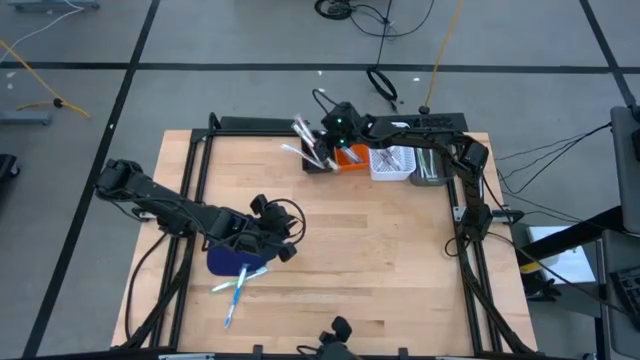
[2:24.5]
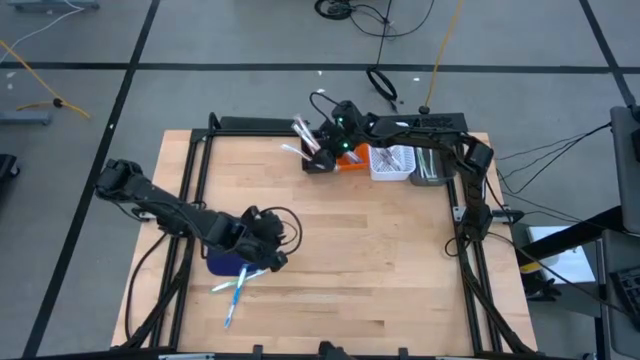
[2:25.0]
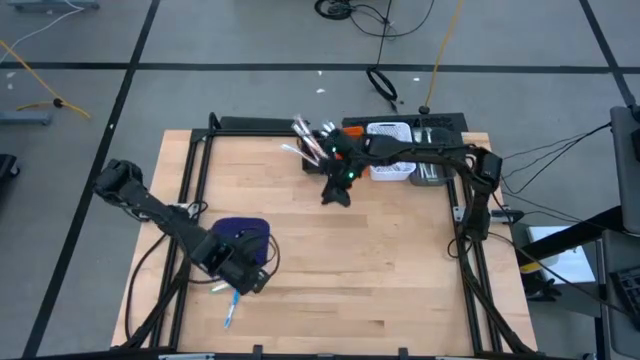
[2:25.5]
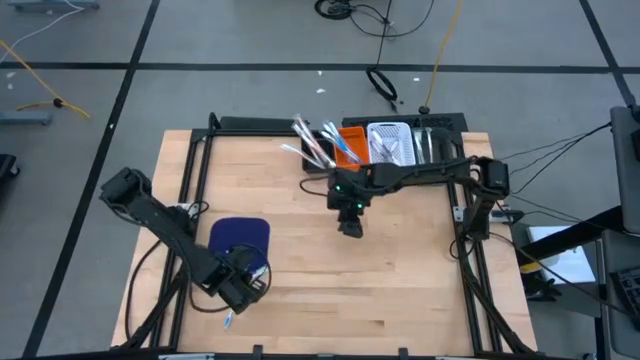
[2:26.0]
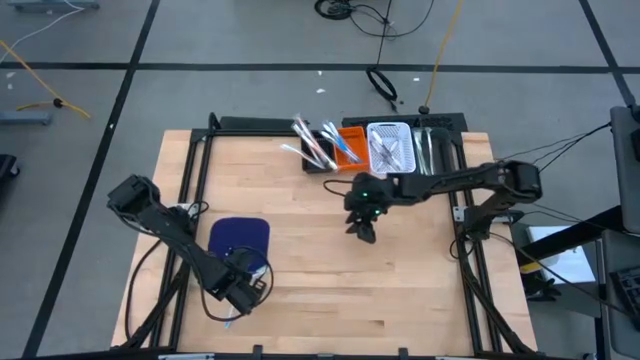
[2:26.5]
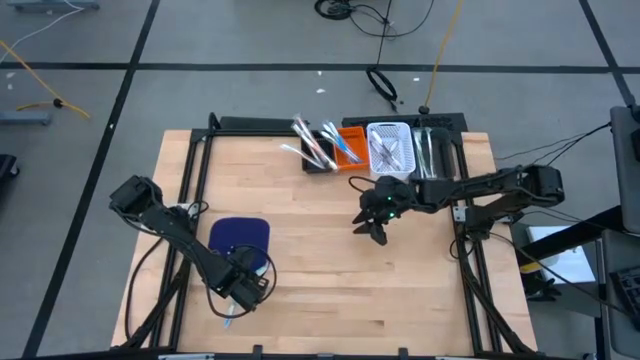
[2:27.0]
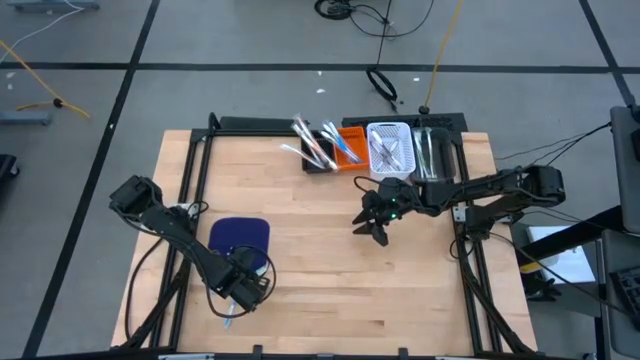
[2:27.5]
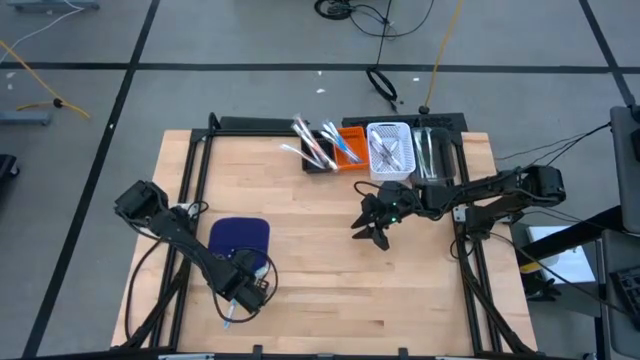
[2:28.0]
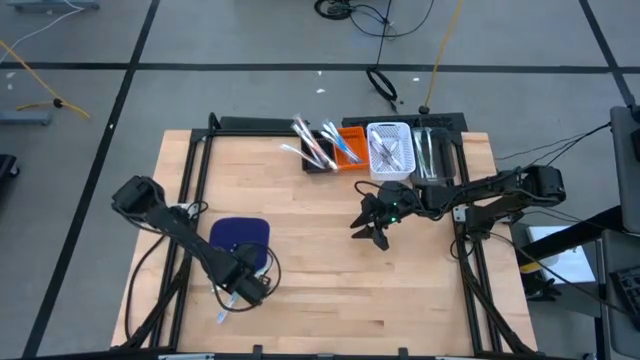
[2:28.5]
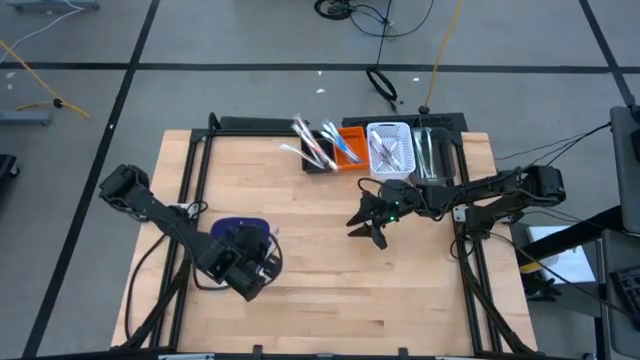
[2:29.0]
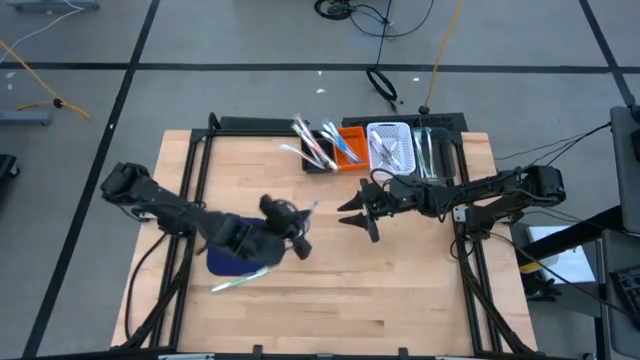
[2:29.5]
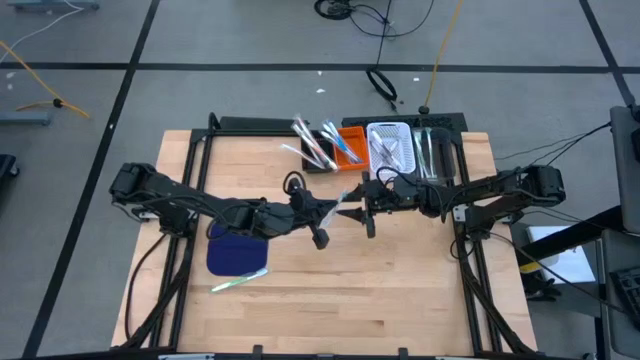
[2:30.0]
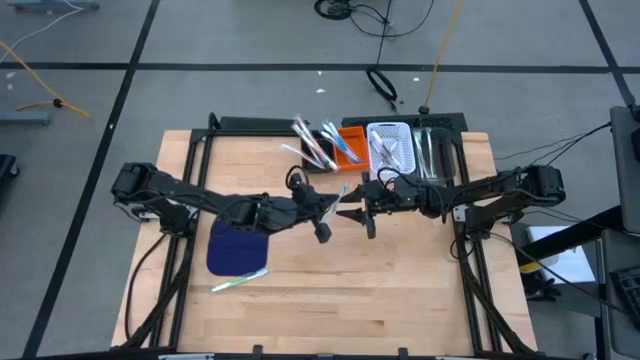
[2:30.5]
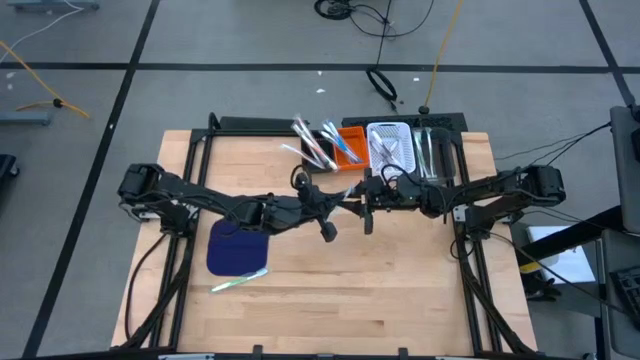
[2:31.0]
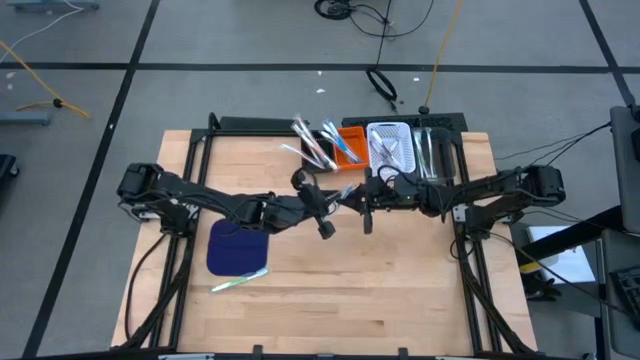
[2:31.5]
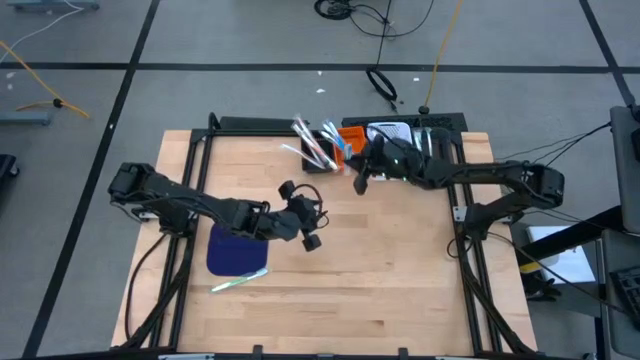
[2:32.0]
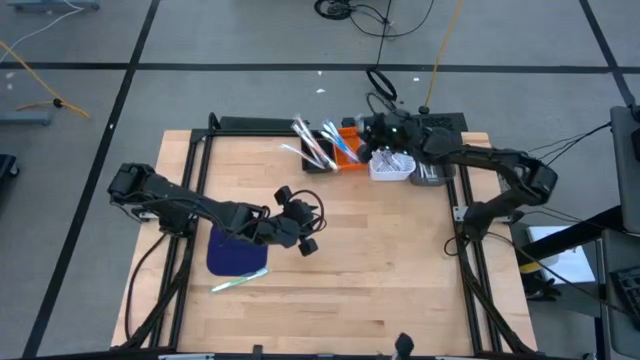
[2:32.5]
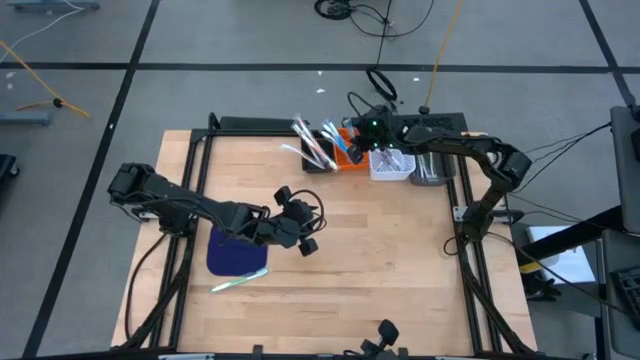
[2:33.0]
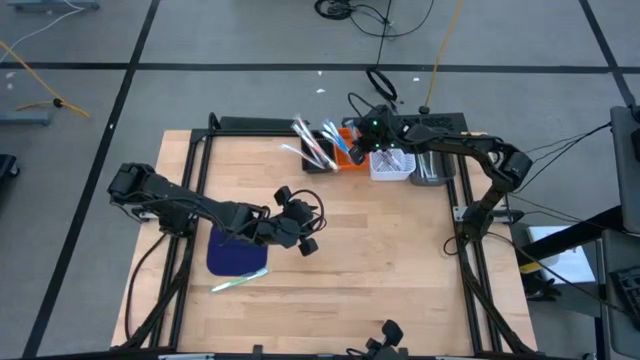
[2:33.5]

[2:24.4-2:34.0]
Task: Pick & Place Toothbrushes
Put the blue toothbrush into the orange bin

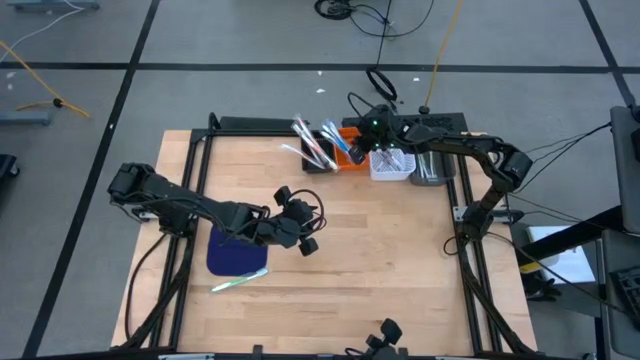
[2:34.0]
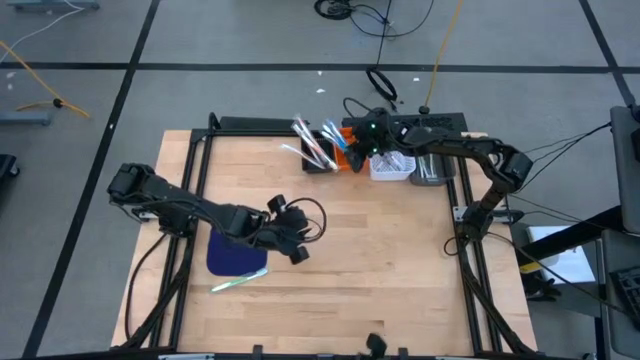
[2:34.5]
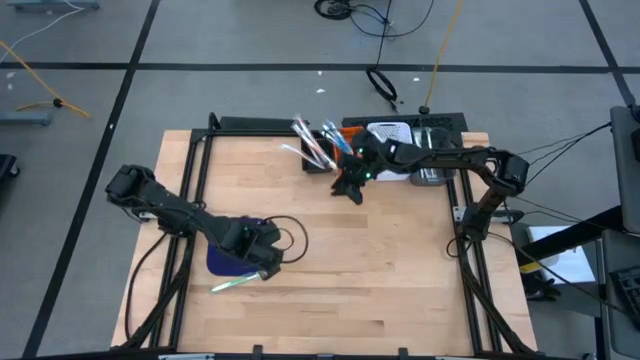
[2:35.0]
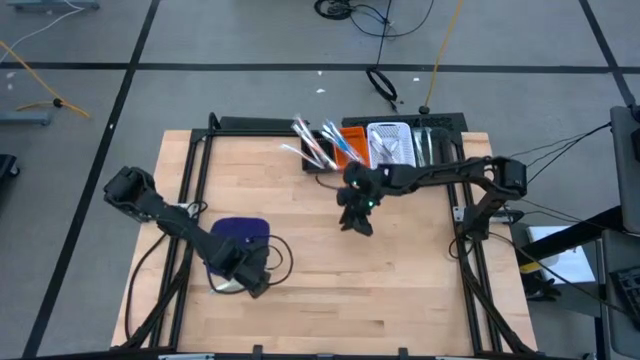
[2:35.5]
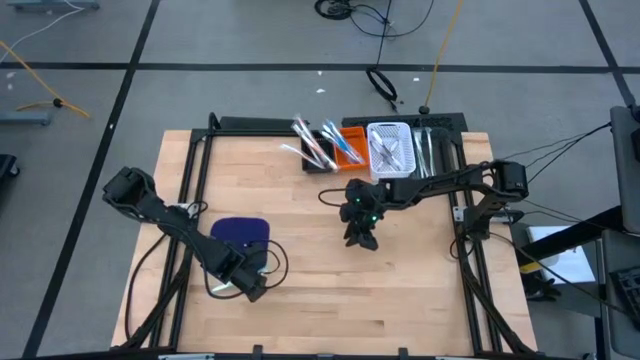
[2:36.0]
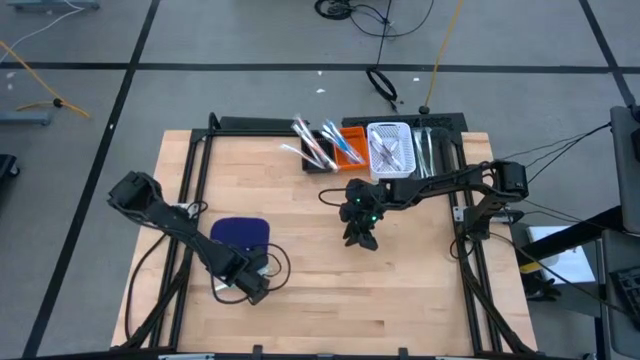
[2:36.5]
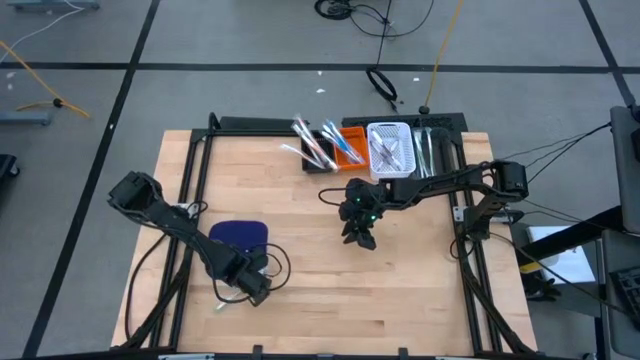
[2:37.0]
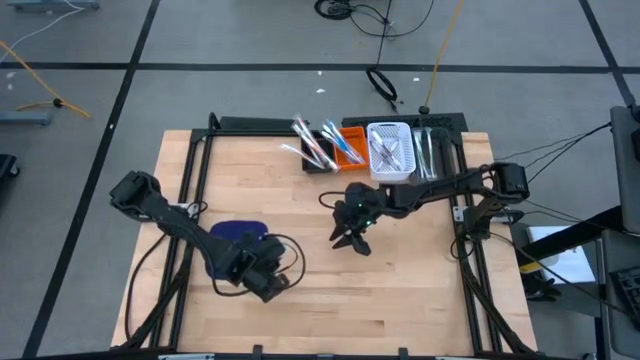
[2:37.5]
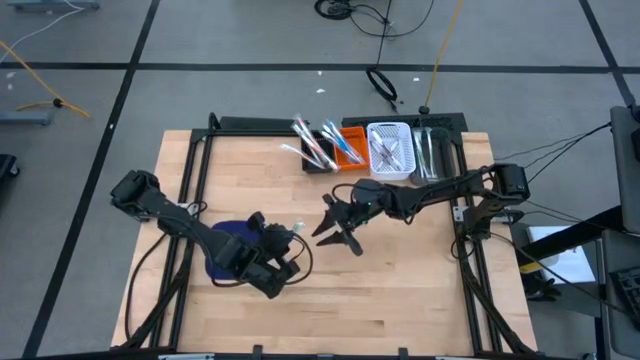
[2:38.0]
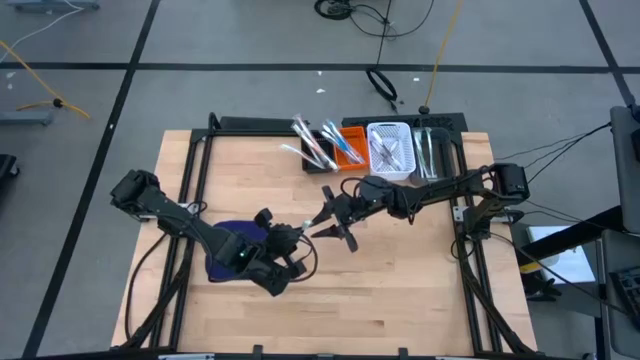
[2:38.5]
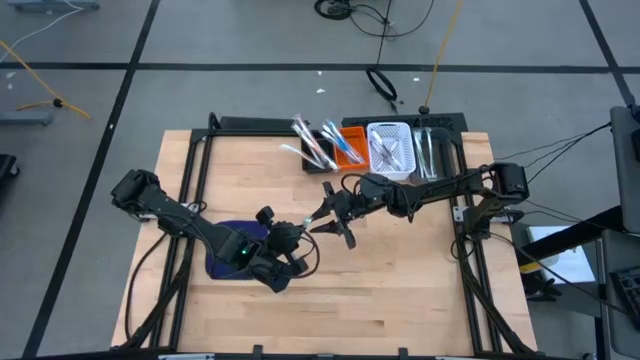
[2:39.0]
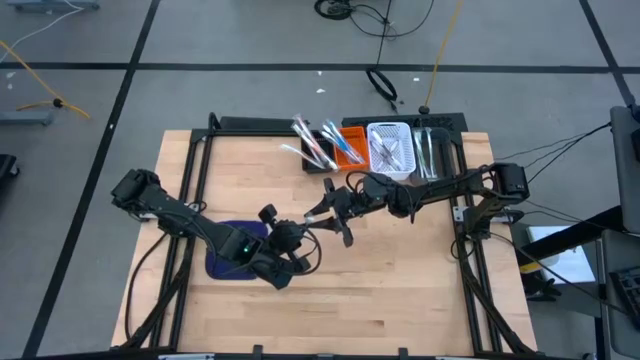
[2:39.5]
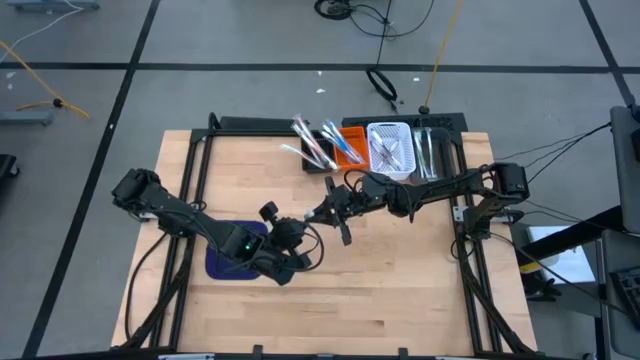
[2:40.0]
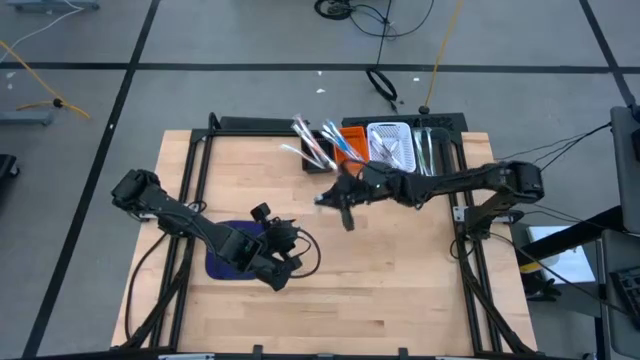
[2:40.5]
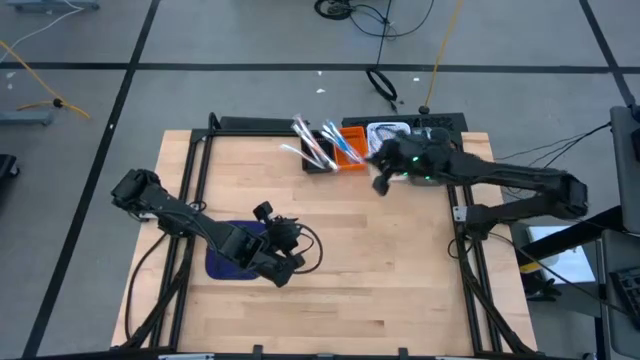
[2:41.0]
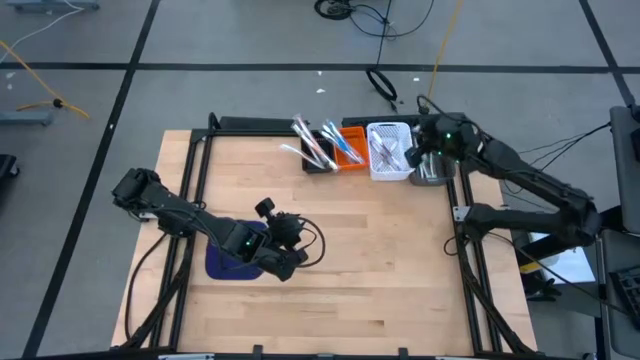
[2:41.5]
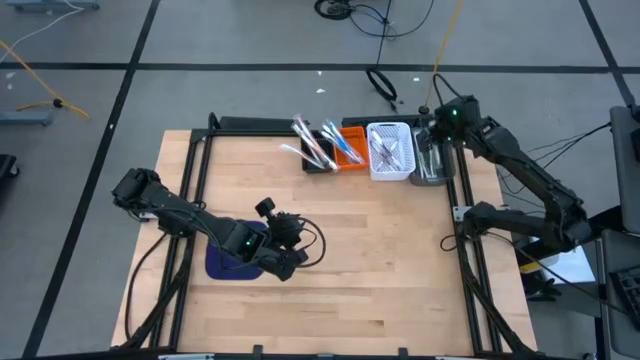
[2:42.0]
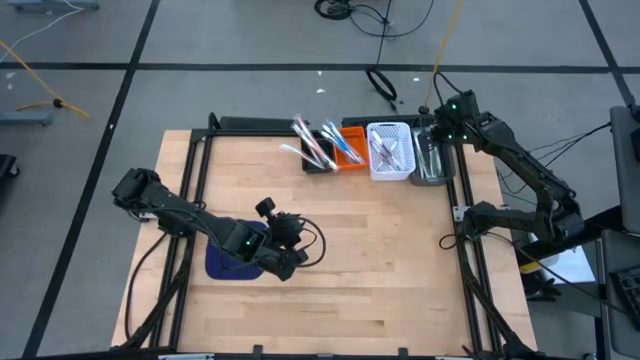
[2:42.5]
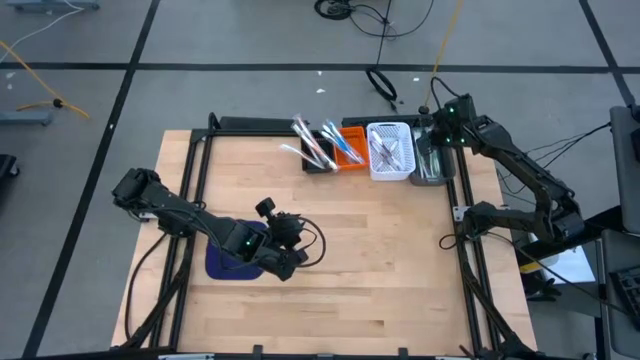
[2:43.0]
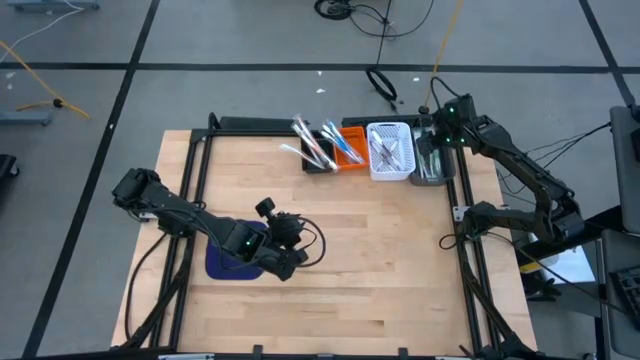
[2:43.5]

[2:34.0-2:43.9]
Put the green toothbrush into the gray bin

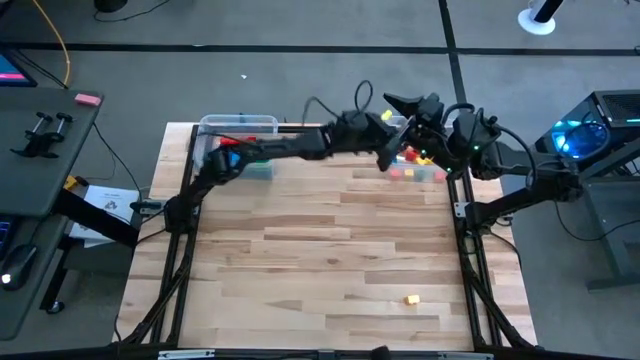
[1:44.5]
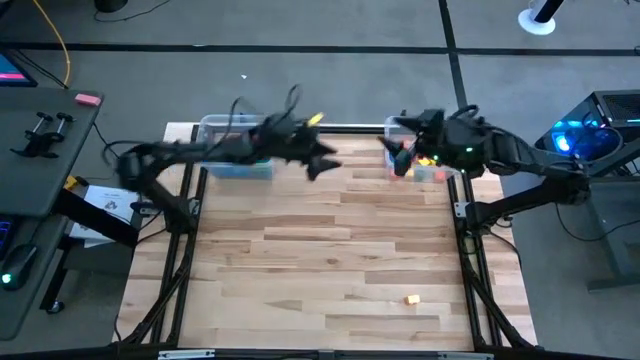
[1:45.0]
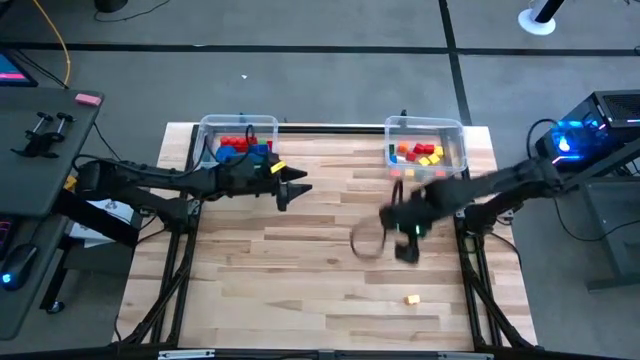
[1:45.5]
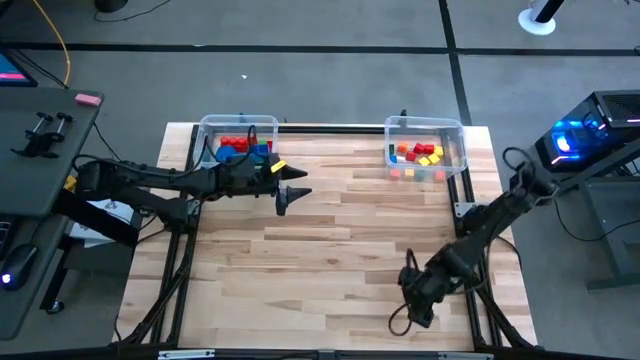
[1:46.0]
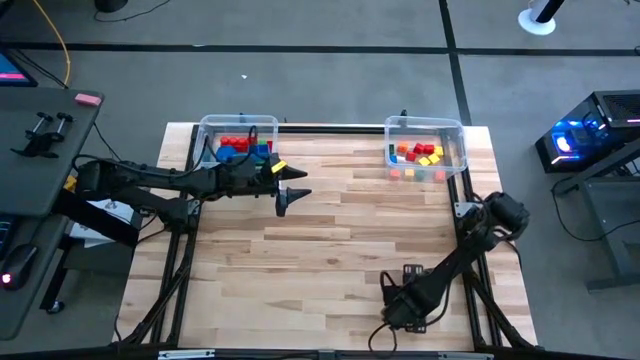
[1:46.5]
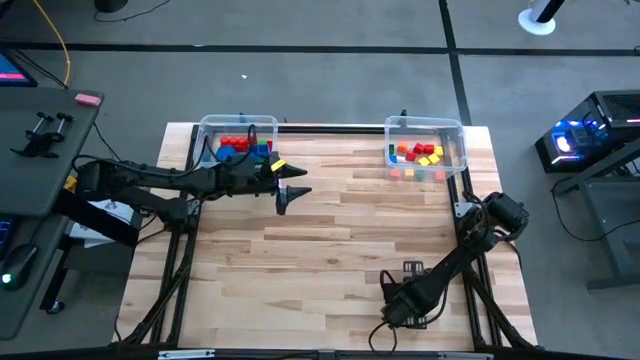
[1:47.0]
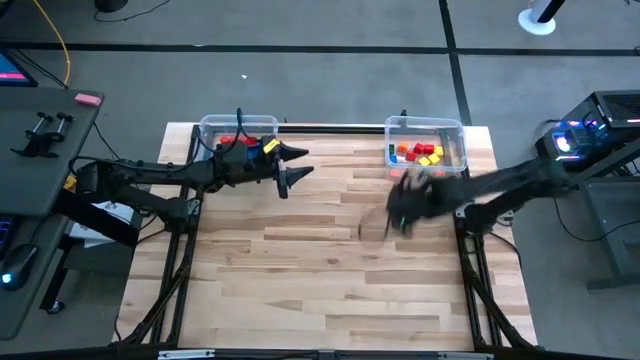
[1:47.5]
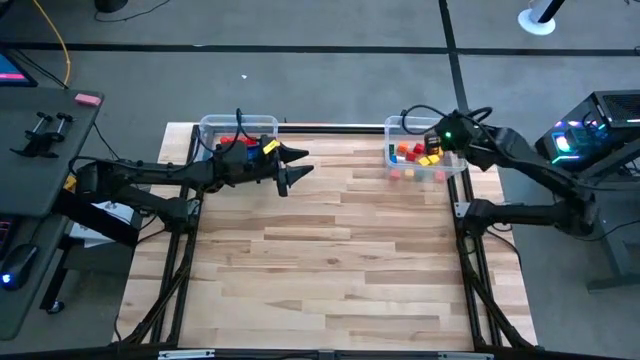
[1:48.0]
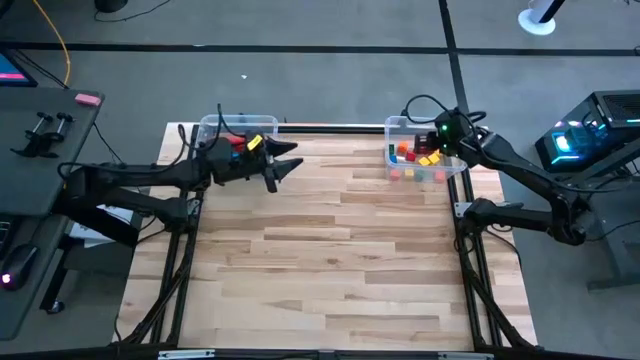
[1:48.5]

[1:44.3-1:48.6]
Task: Sort blocks by size
Put the small game piece into the right transparent bin
